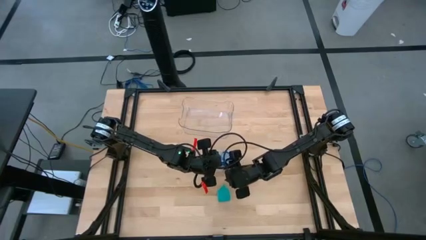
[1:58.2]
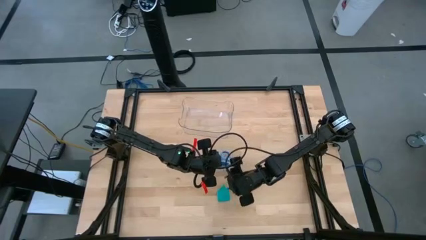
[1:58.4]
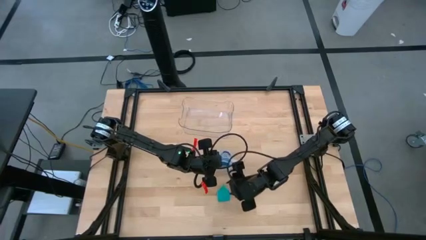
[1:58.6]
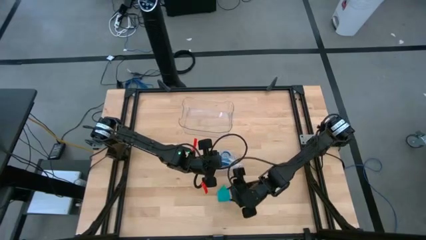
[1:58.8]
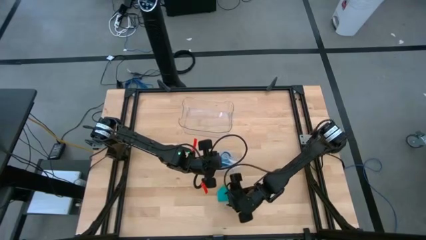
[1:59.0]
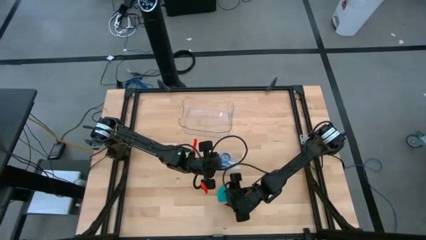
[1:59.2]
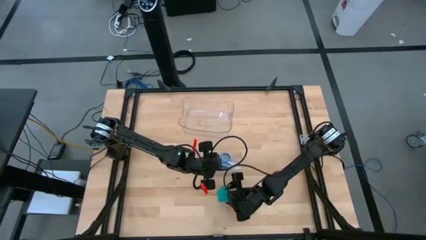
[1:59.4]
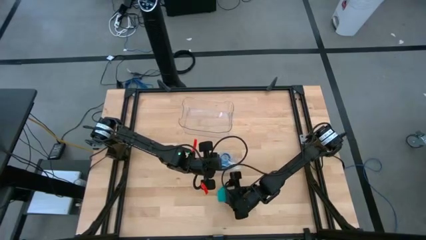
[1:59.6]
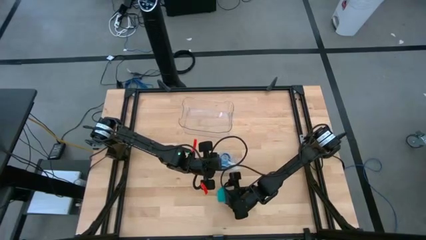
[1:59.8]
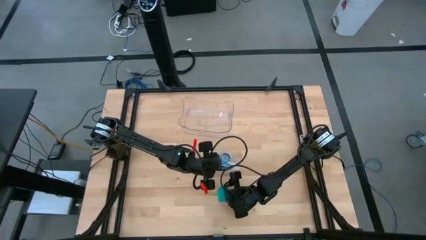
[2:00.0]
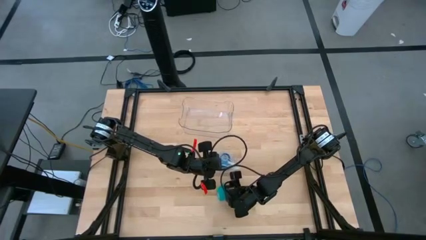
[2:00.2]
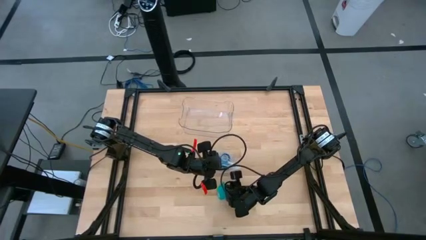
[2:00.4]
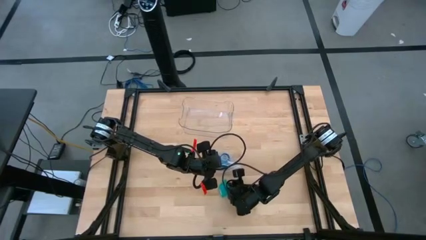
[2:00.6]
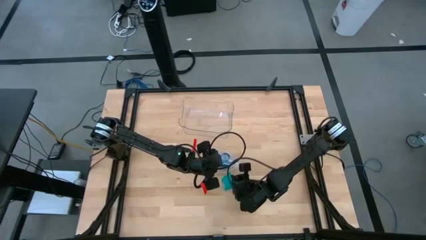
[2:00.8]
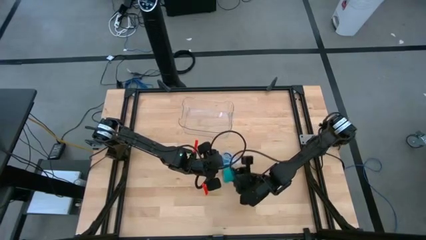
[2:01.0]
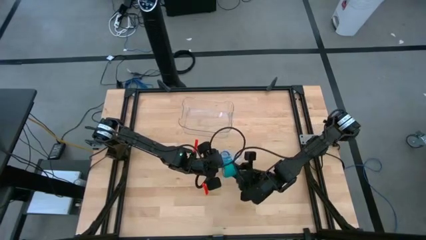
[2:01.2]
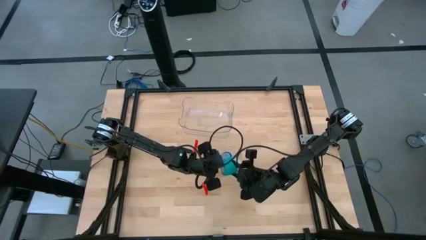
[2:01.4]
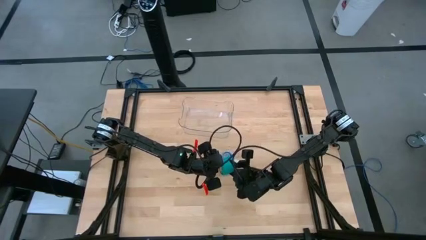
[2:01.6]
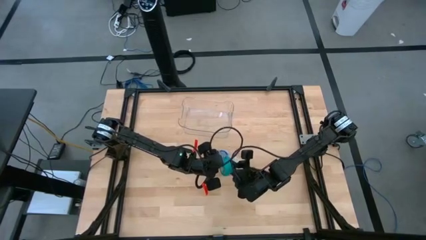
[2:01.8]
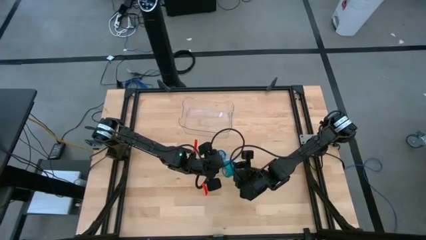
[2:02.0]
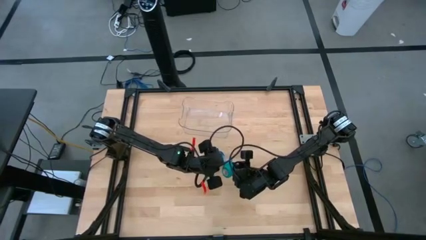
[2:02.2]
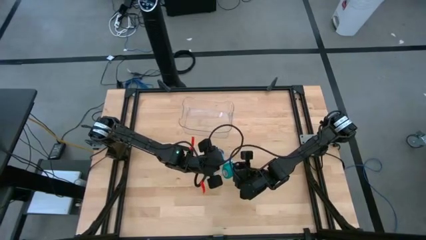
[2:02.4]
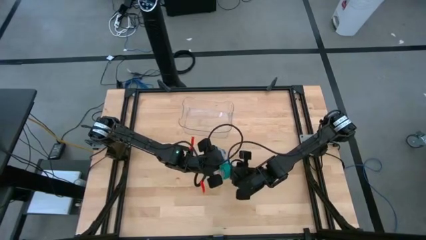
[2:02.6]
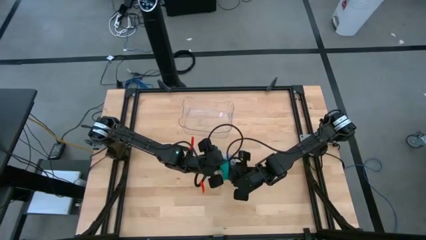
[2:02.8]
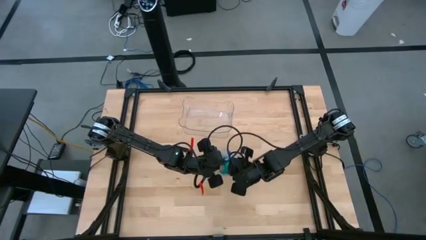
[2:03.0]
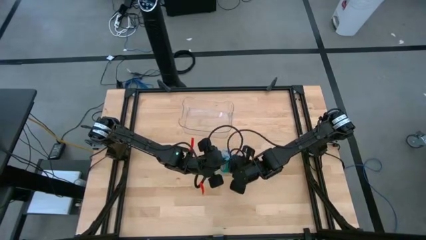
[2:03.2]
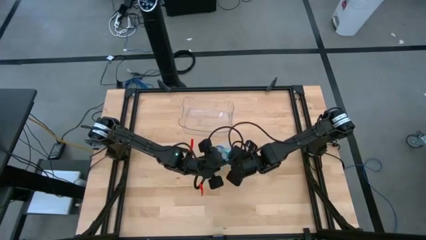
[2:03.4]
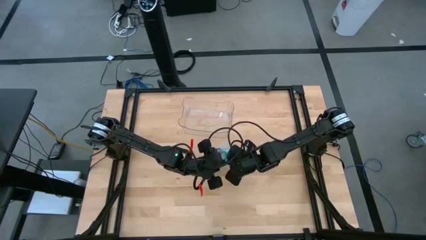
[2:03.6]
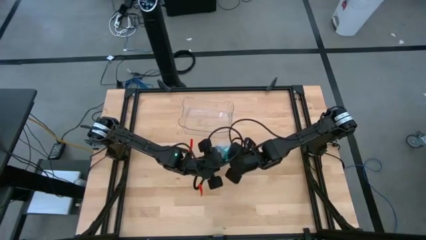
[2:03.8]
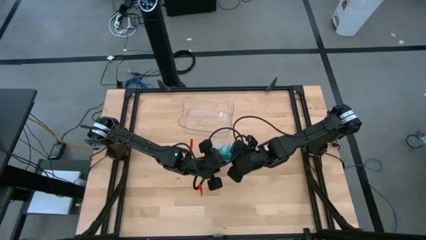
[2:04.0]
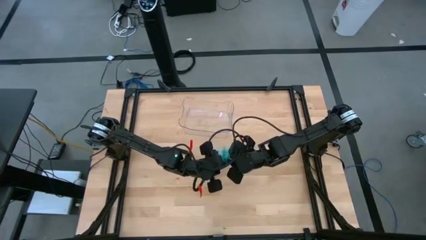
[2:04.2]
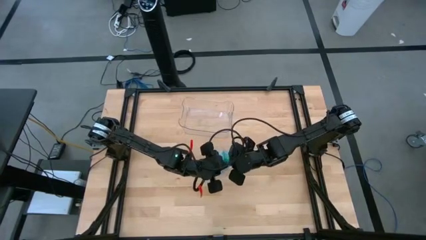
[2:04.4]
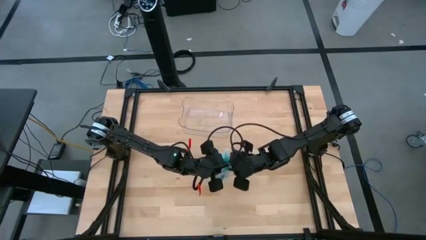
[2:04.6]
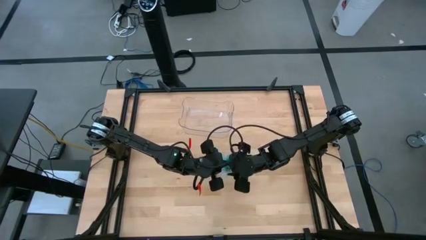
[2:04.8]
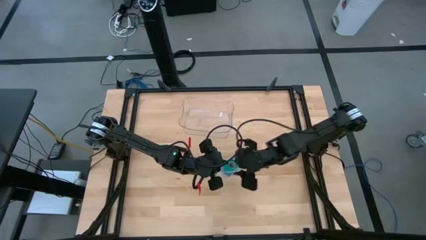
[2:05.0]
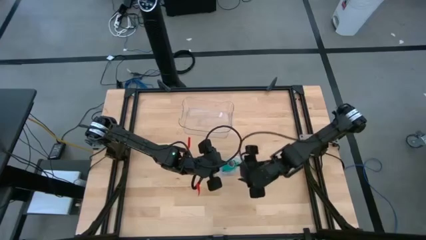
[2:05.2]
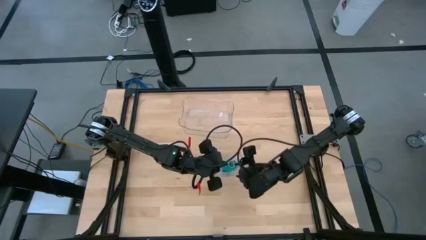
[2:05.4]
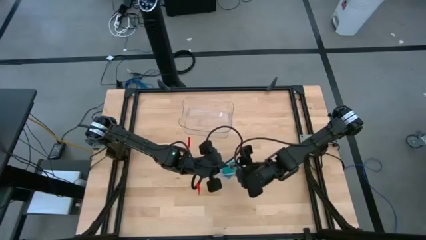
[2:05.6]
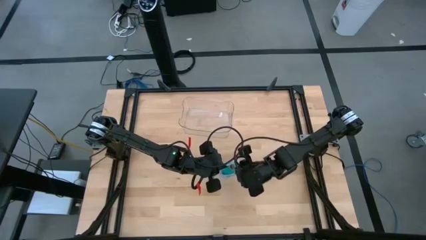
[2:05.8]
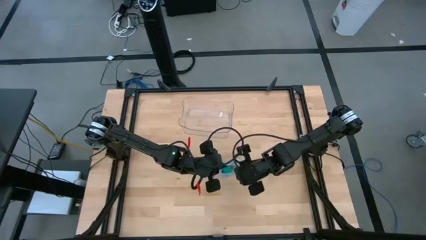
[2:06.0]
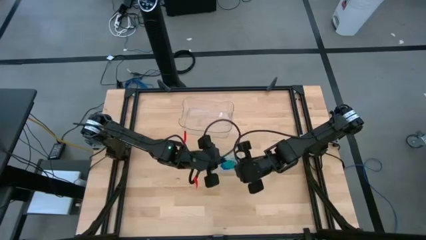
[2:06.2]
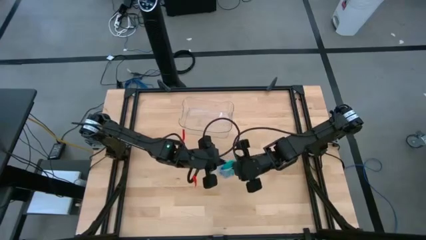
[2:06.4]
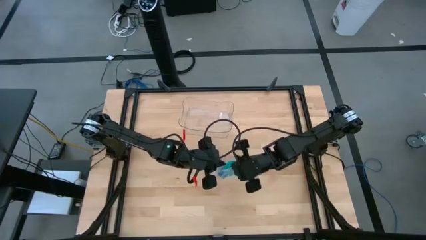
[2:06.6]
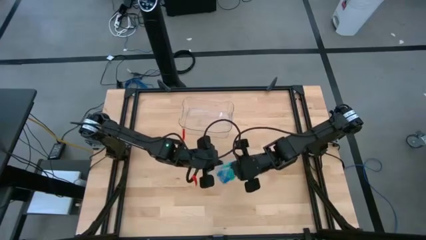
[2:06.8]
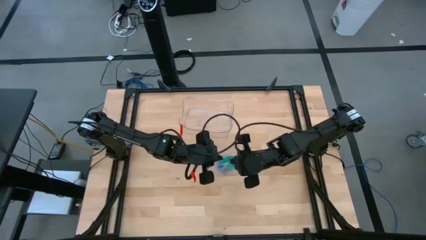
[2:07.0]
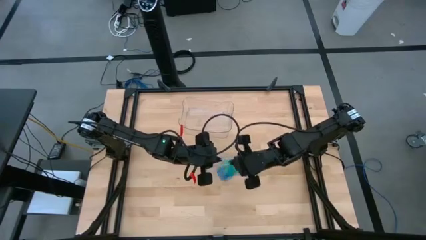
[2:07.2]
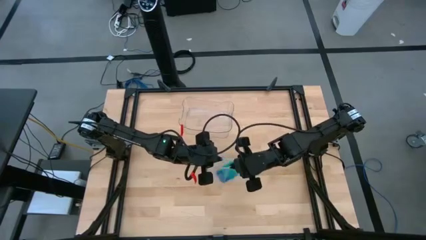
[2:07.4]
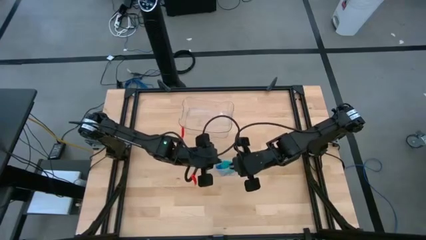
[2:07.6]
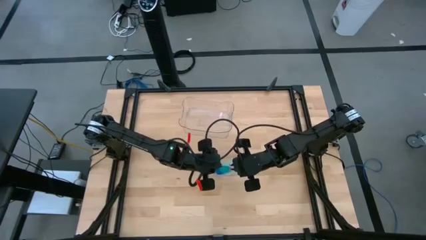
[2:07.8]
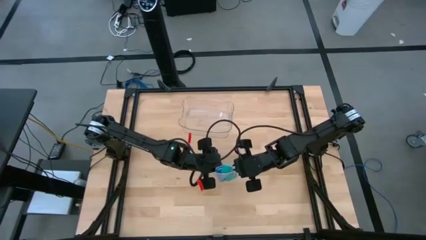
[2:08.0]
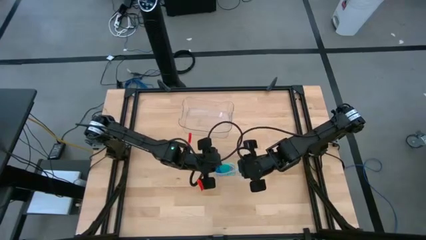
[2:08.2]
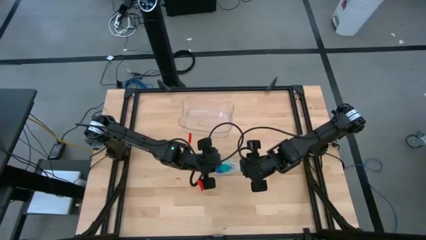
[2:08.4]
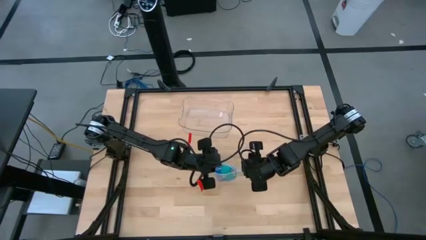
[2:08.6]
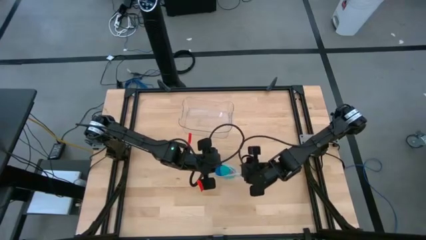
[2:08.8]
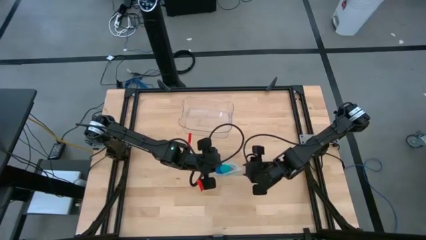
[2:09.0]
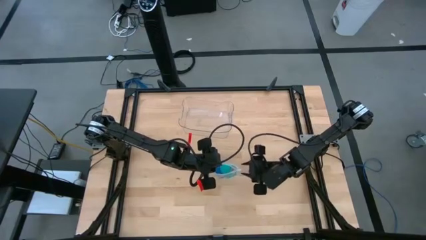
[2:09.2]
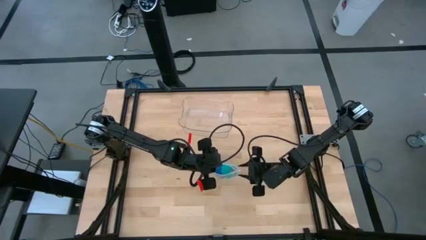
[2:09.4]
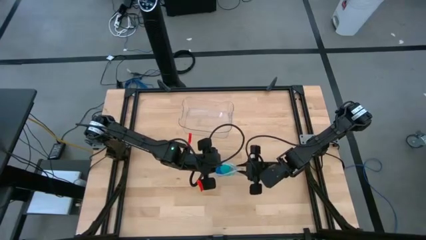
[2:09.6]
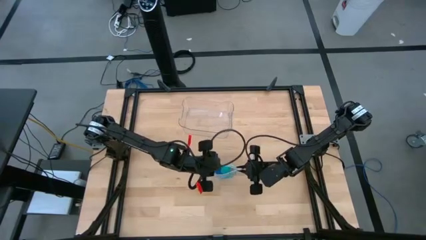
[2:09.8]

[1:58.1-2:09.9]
Task: Roll bandage
Put the rolled green bandage into the transparent zip bag

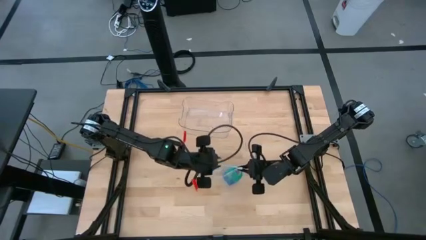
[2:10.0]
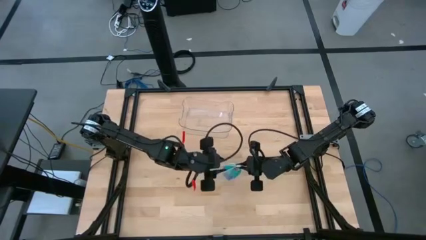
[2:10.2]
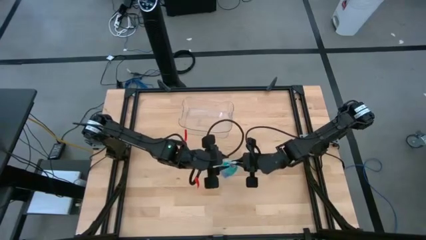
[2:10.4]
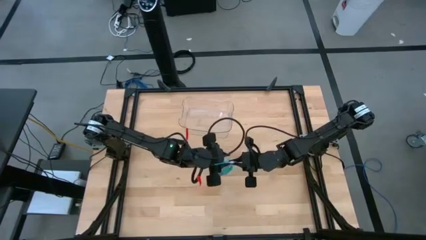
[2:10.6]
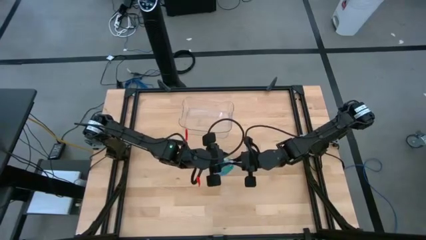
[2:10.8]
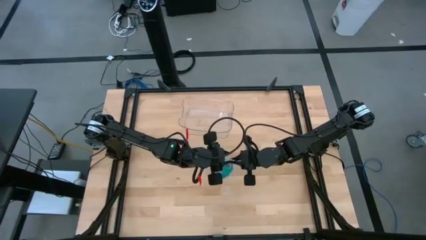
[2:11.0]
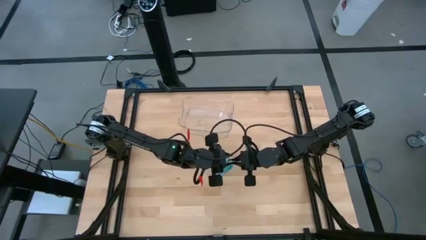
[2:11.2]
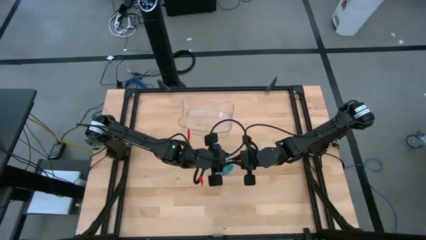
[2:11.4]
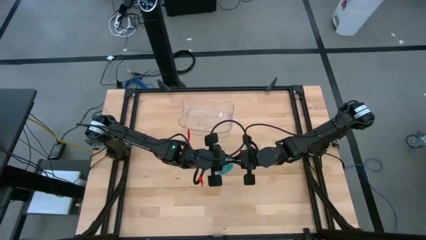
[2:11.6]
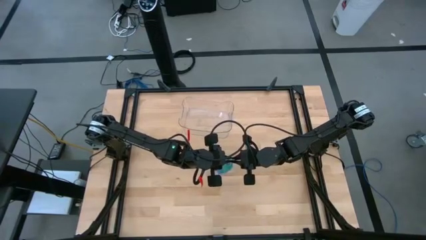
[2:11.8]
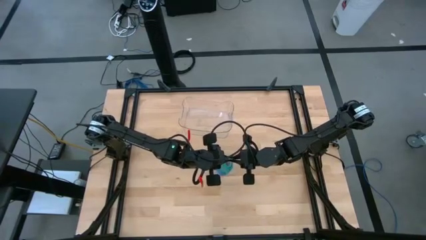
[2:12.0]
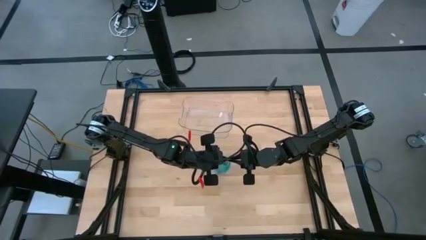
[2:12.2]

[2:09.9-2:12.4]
Close the transparent zip bag
